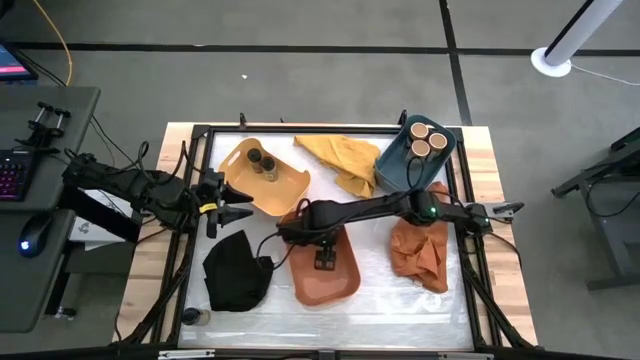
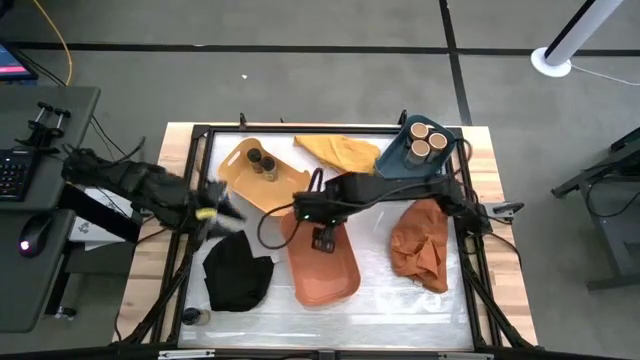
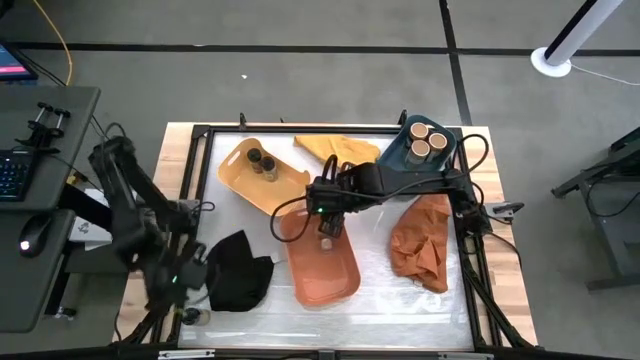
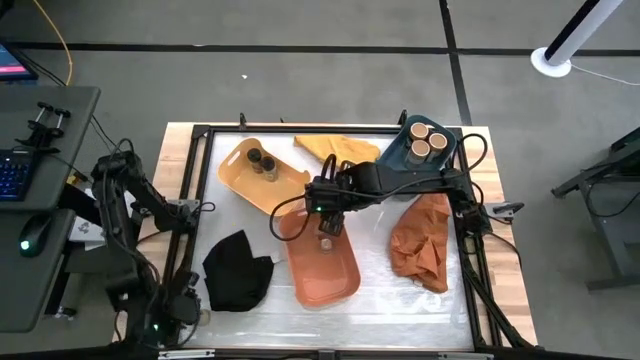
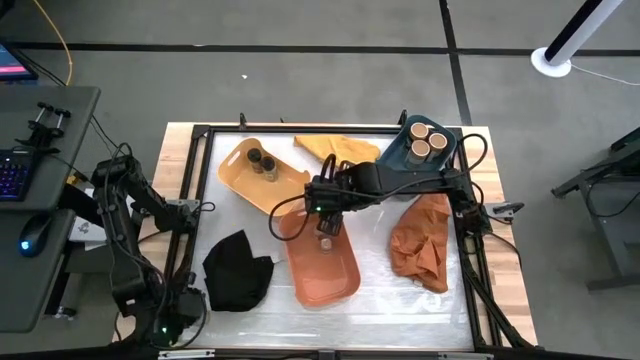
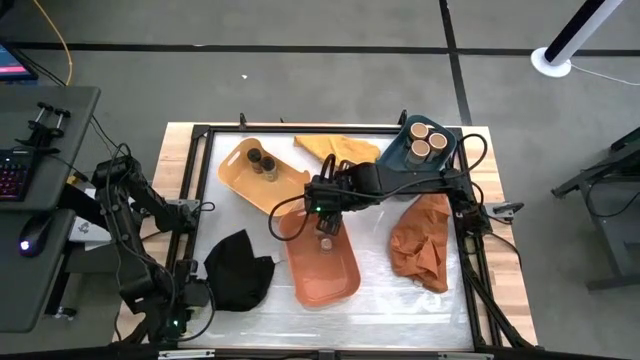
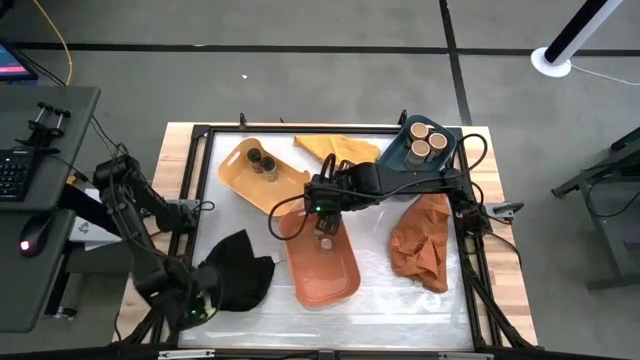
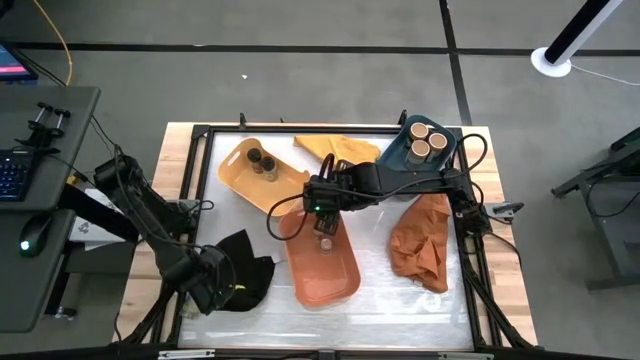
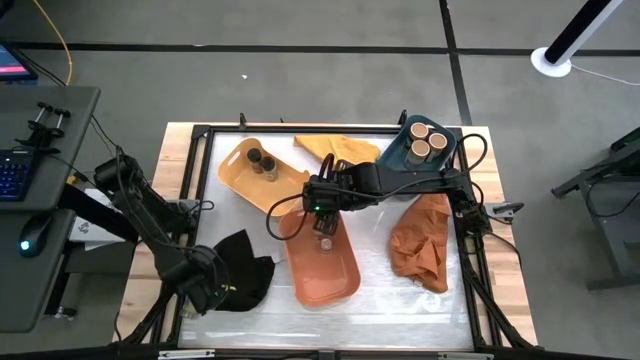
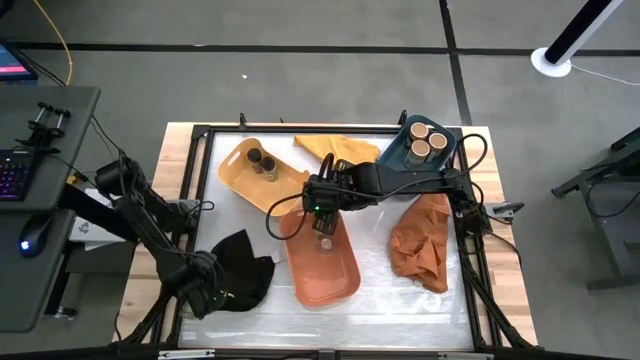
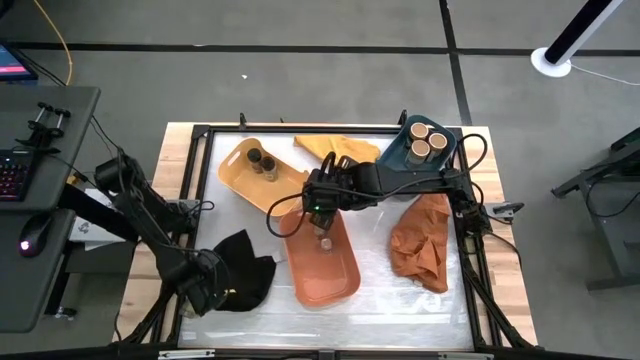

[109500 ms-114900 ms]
Task: Sort spices by type
Put the black seasoning bottle into the yellow bin

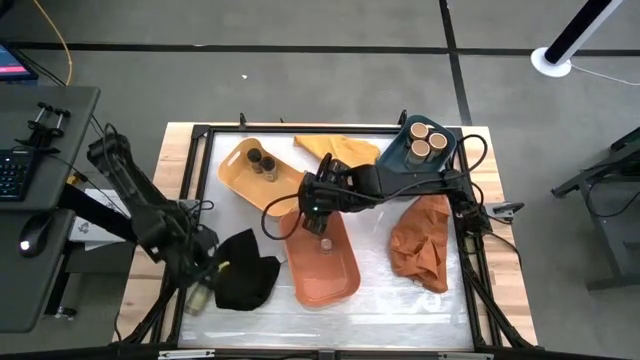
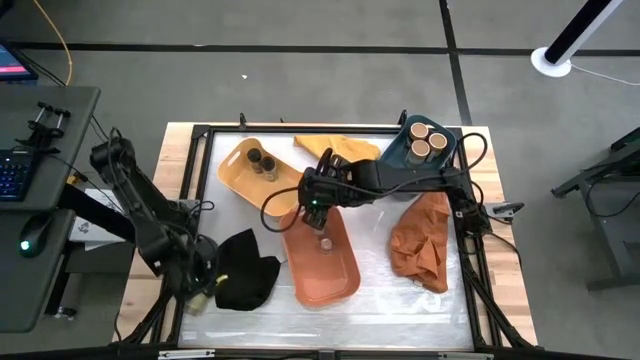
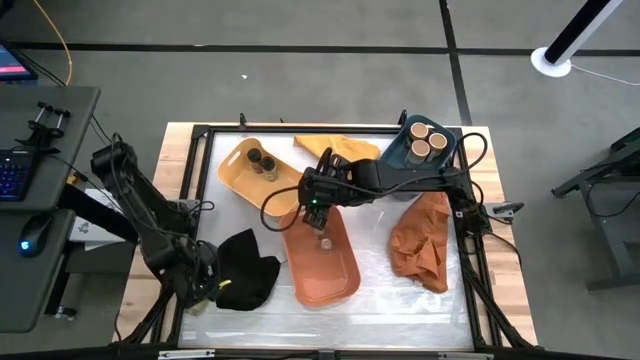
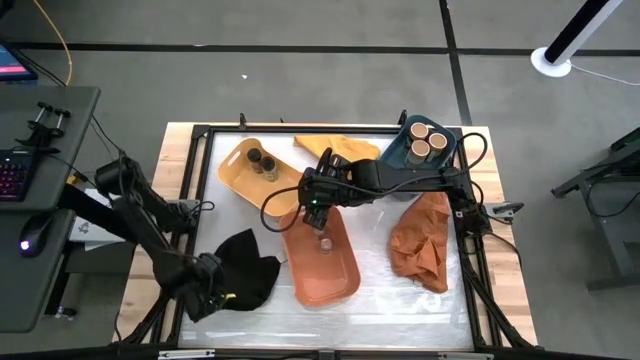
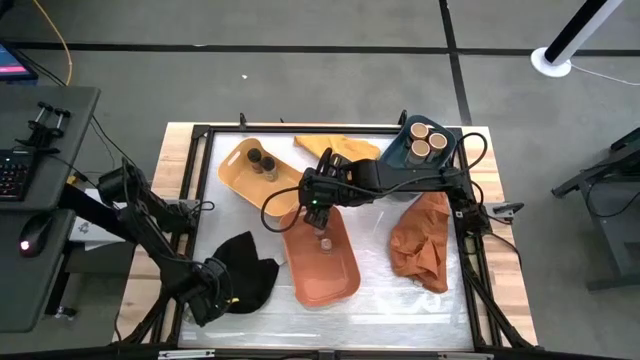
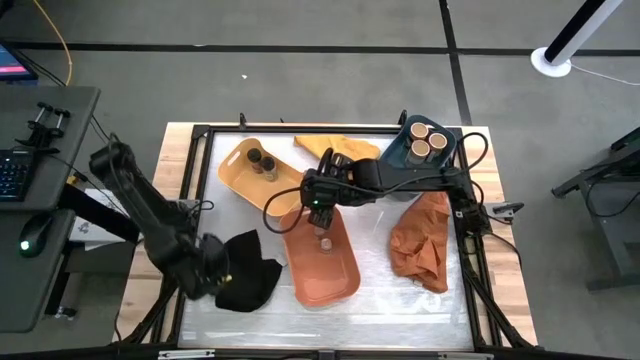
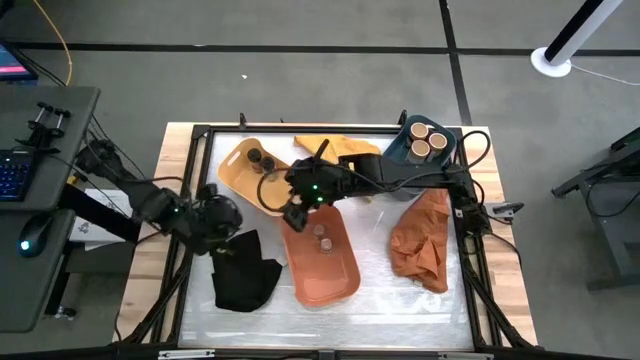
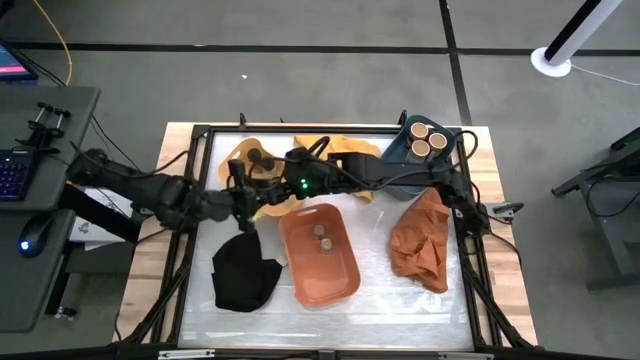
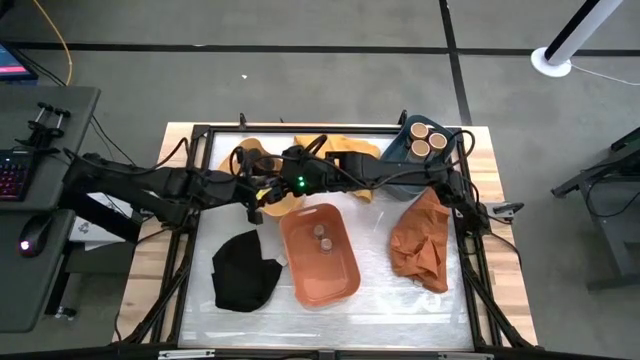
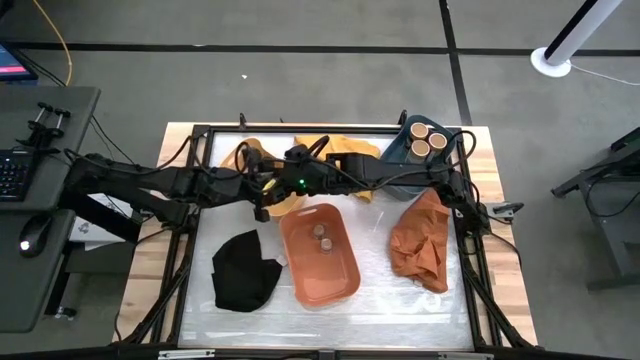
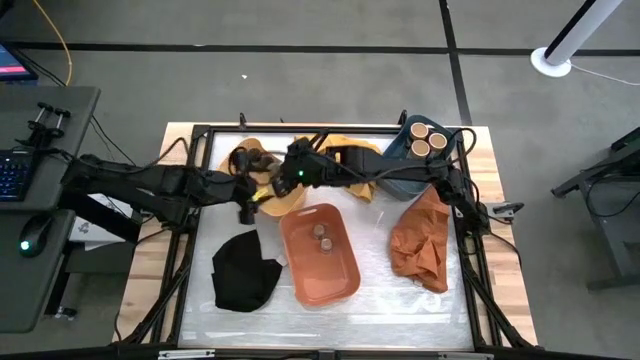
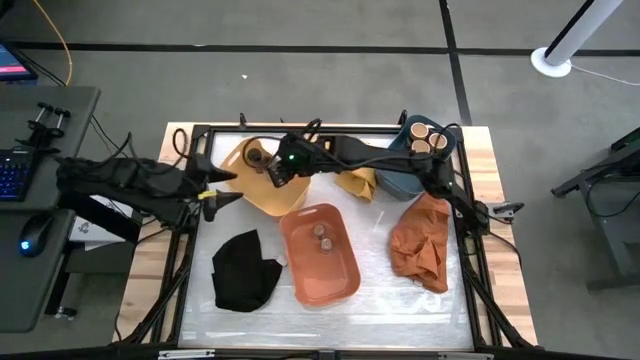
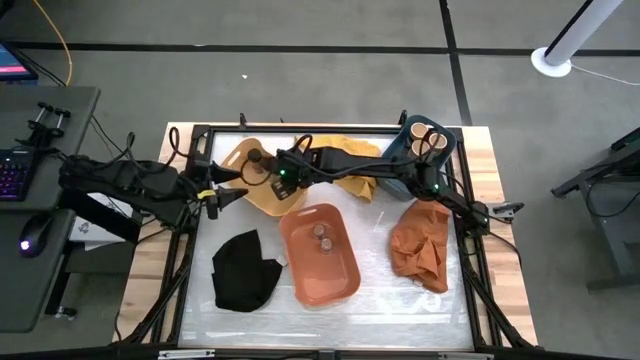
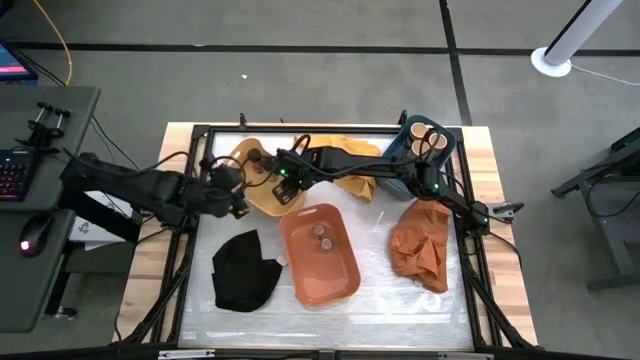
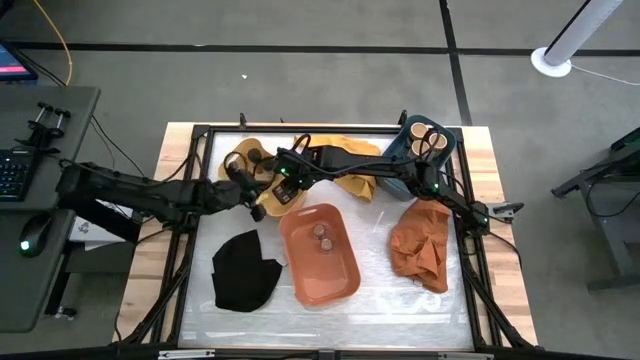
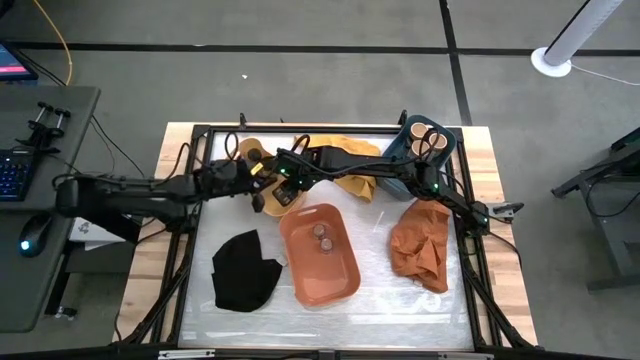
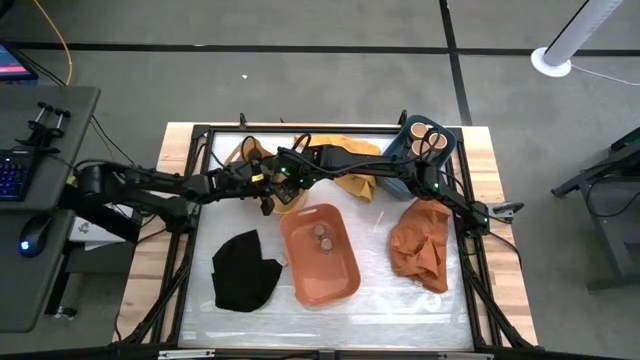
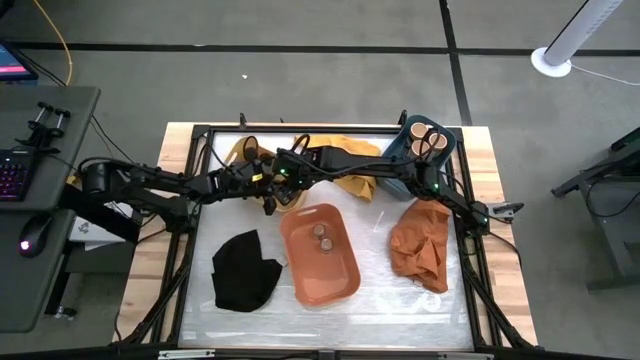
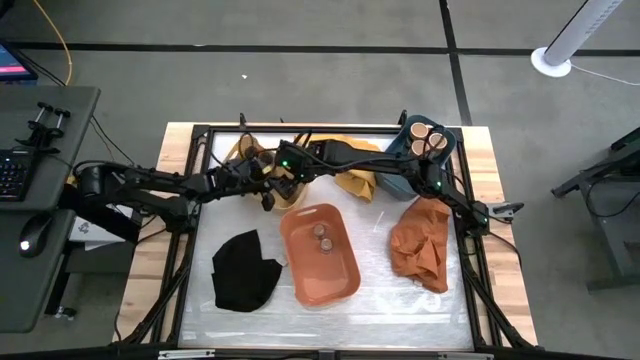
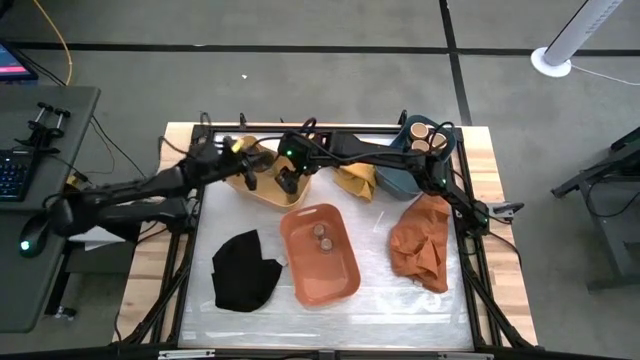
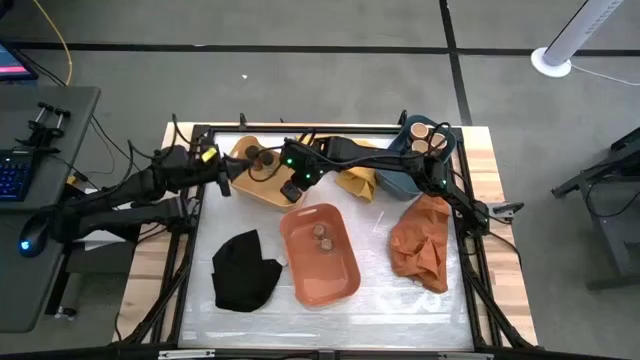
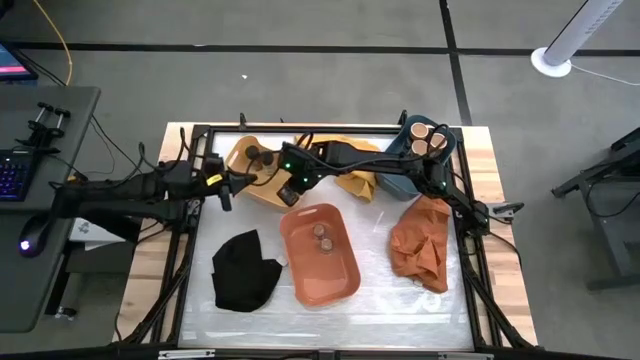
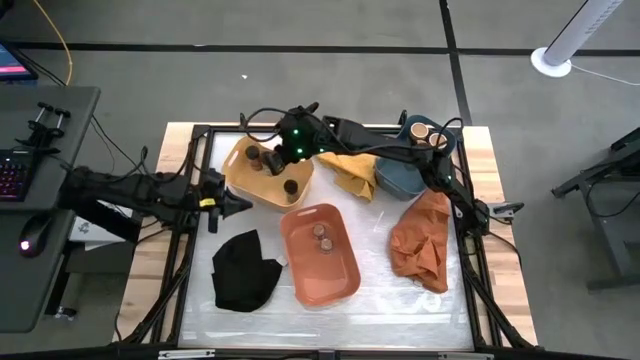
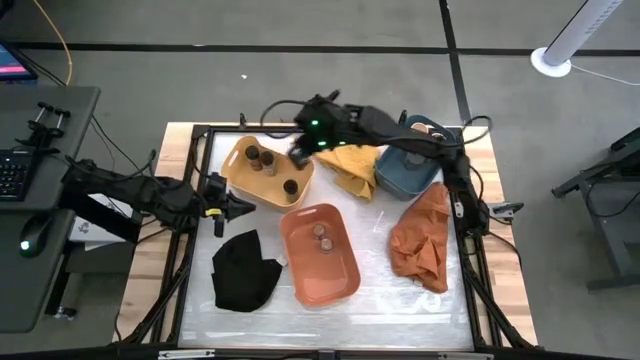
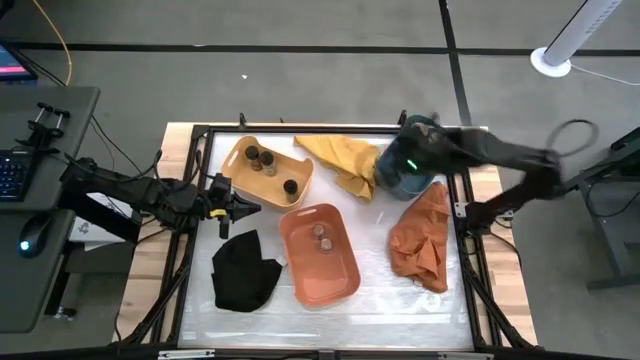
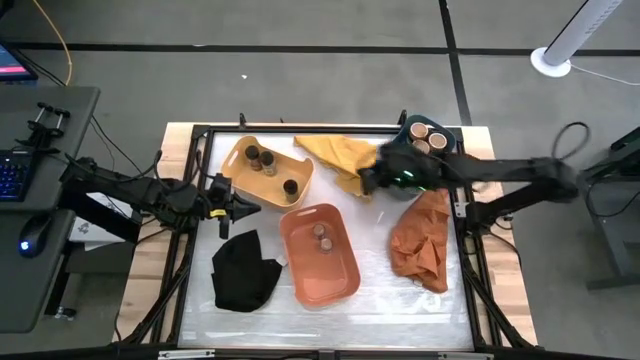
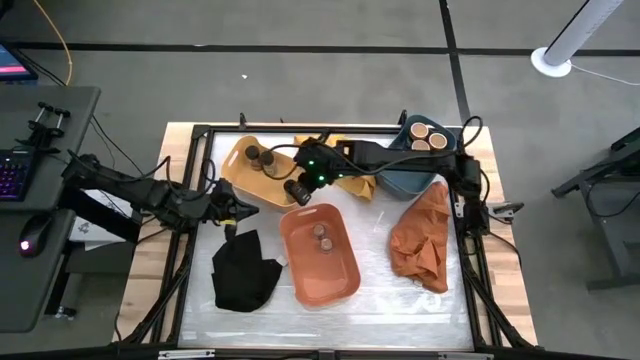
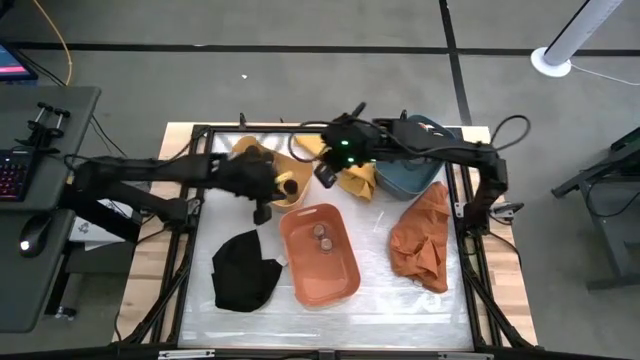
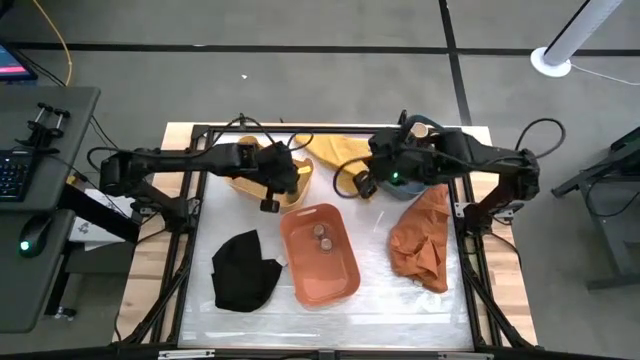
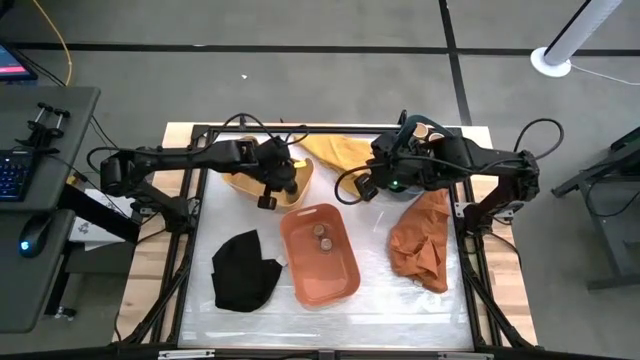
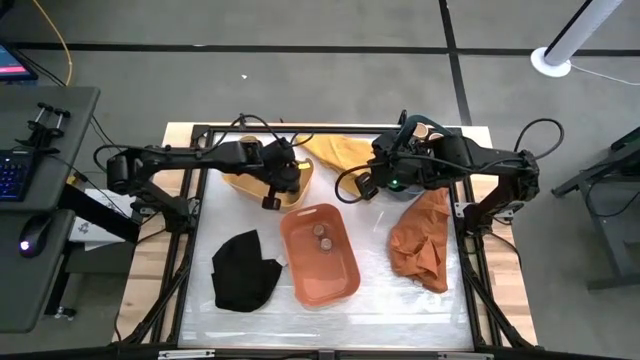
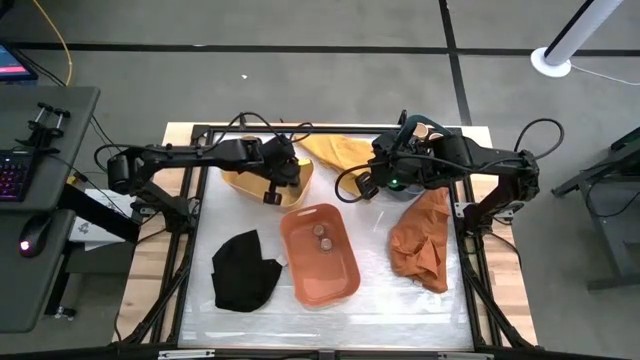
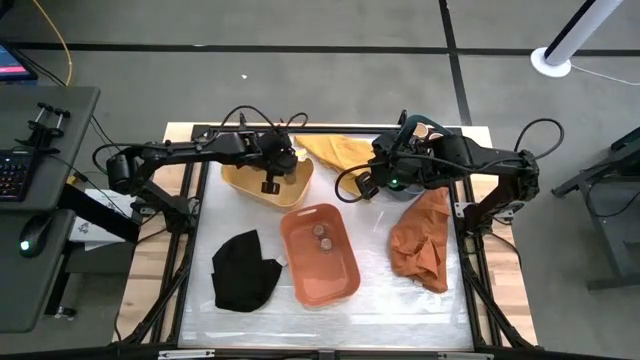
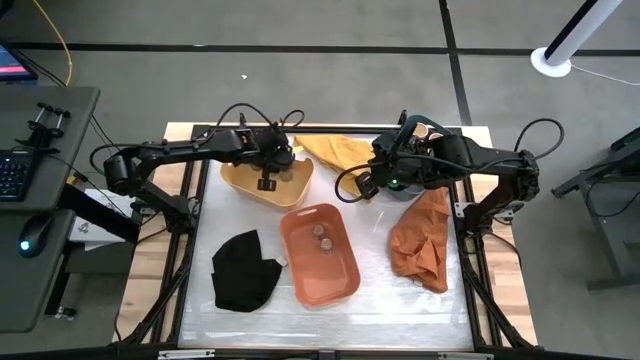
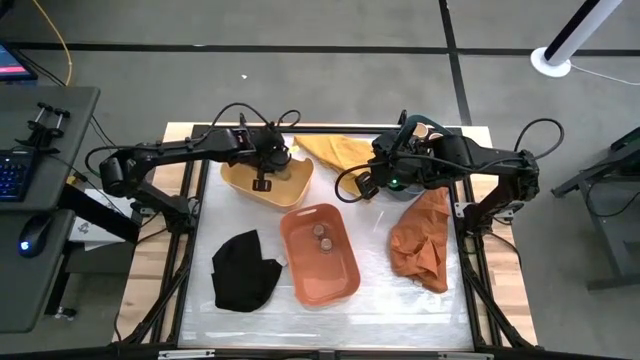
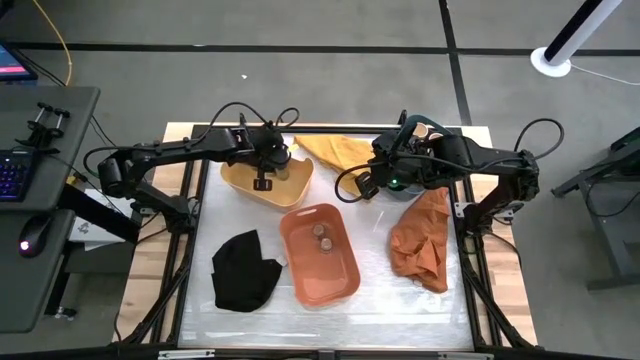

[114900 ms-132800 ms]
Put the green seasoning bottle into the yellow bin
